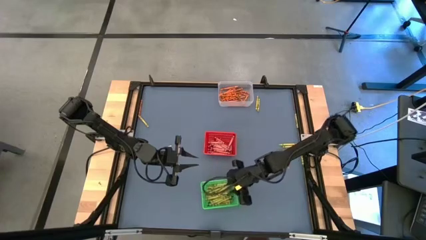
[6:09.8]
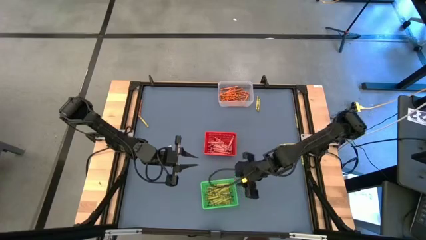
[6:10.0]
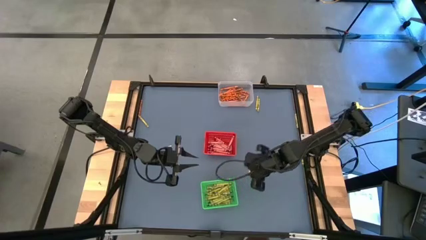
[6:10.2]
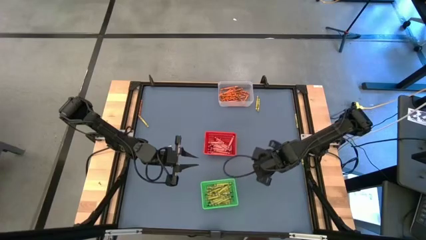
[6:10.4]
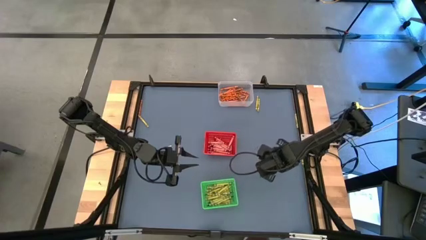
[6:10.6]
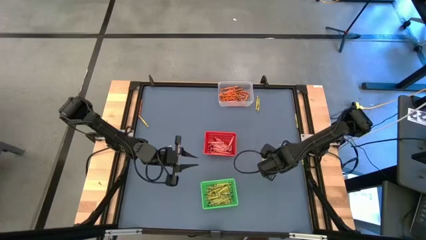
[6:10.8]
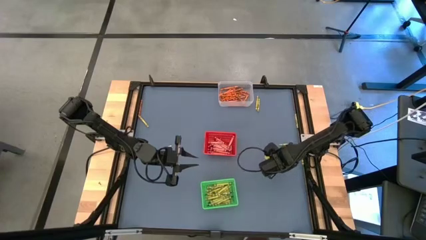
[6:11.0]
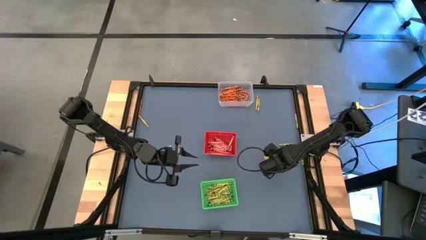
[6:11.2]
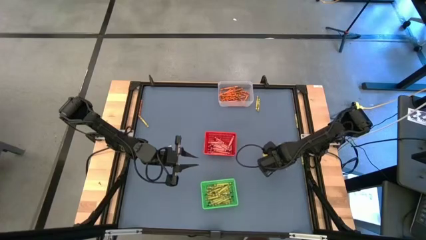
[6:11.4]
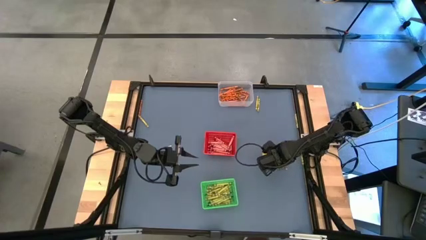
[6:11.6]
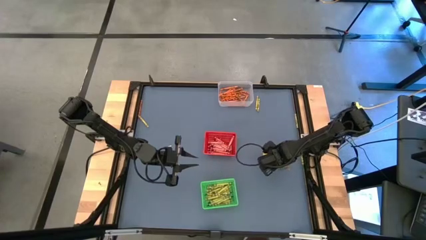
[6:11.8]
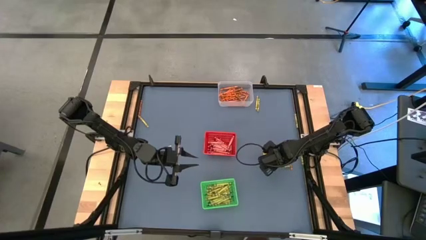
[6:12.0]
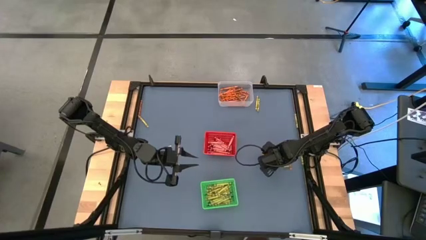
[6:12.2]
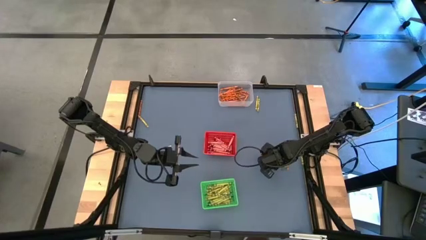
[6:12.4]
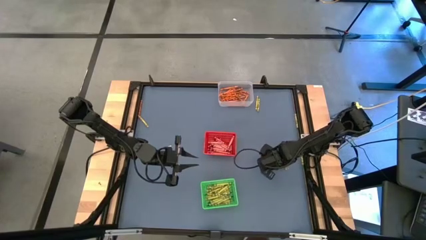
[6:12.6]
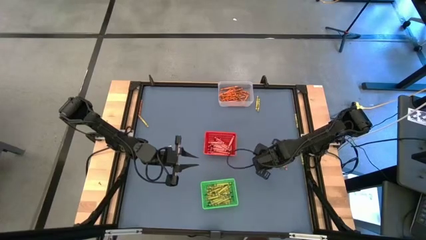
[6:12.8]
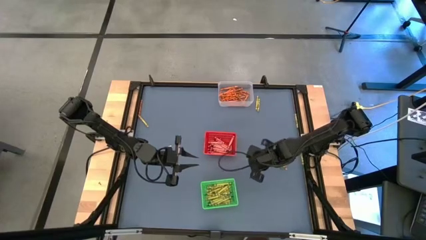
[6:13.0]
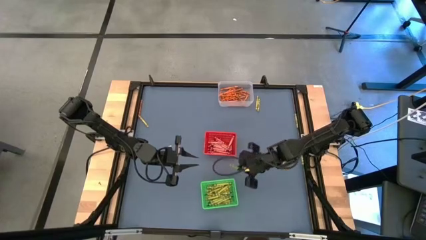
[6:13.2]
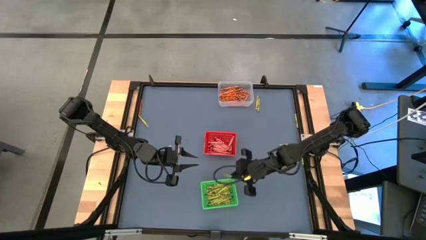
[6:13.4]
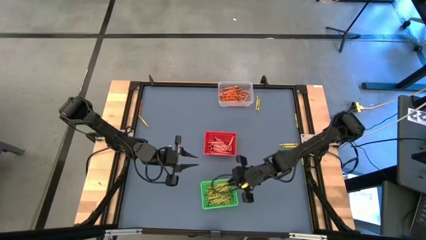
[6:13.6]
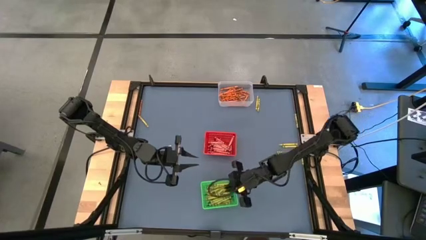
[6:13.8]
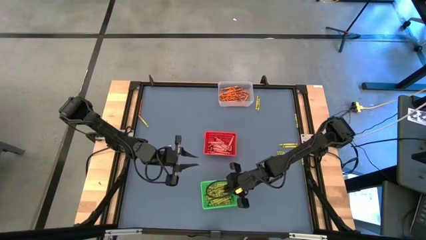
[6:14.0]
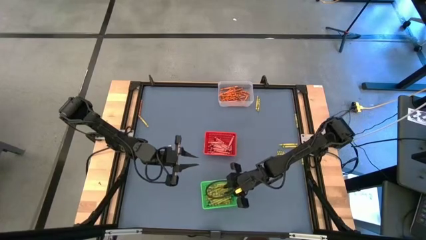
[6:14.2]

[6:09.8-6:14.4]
Task: Sort crayons
Put the green crayon into the green bin

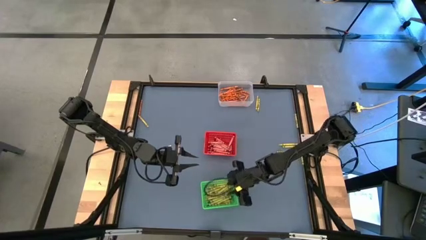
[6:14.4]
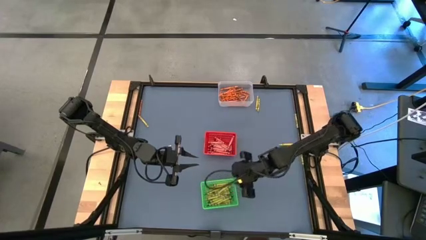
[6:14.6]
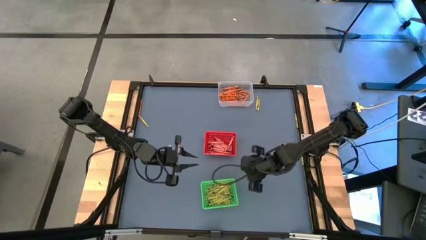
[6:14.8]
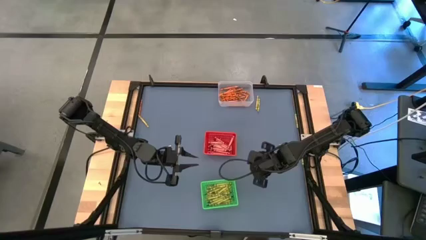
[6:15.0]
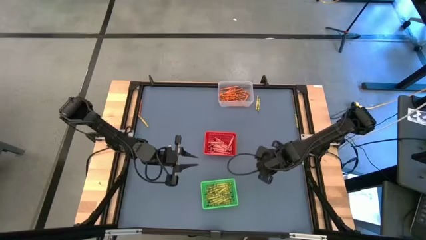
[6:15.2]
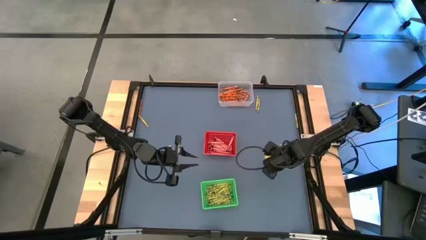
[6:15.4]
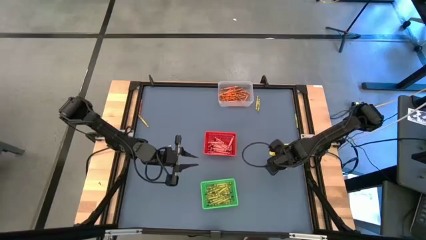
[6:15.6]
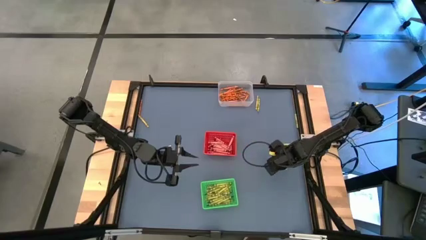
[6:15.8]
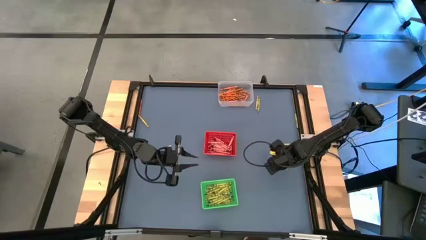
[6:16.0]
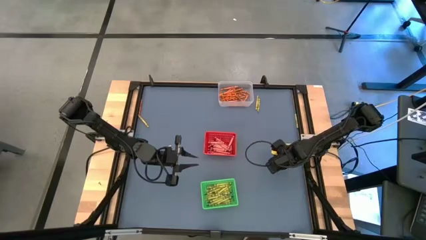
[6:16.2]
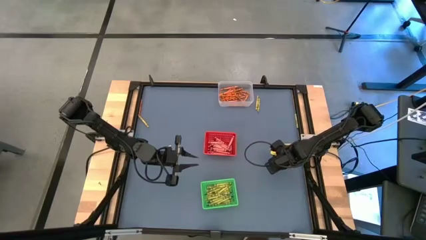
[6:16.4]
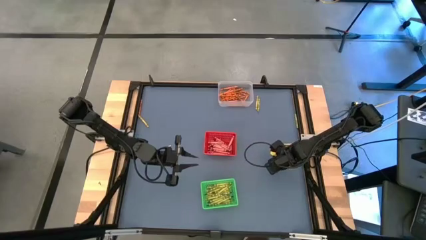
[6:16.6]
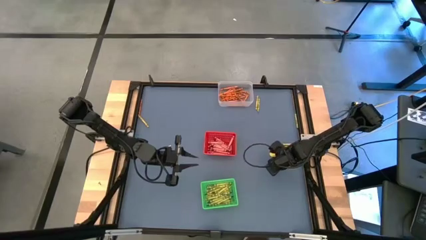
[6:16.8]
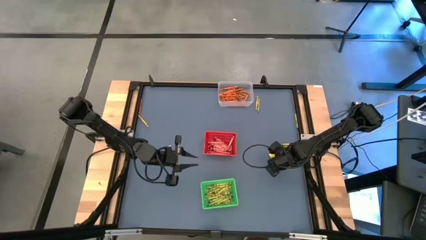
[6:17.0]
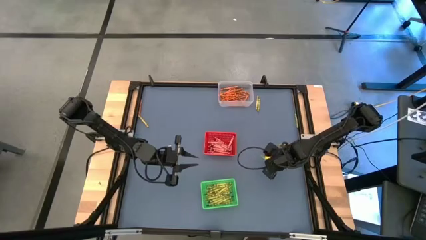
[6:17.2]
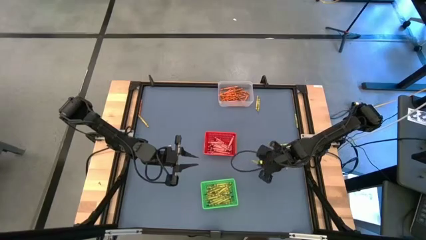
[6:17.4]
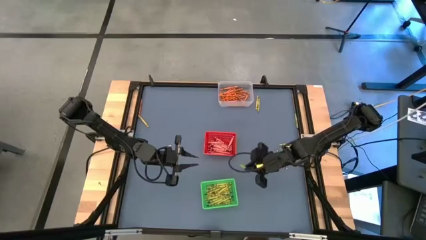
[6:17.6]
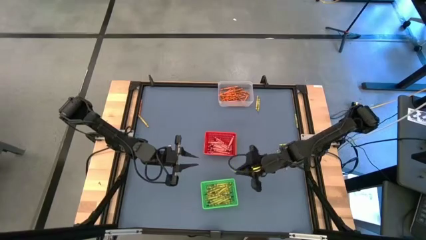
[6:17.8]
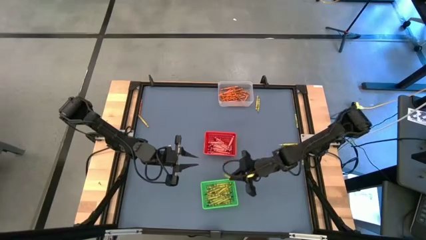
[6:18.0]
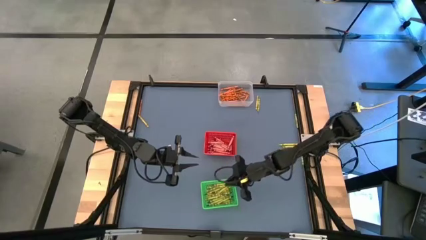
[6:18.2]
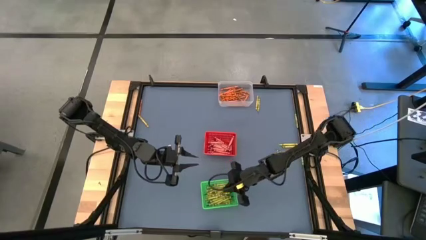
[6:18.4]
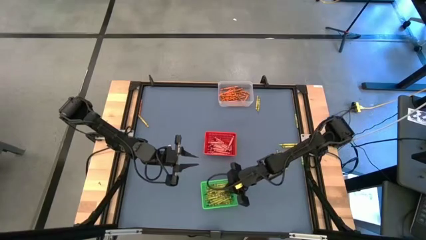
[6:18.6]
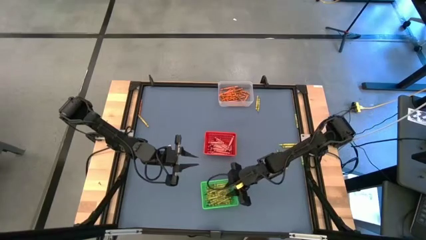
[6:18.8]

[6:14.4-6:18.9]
Put the green crayon into the green bin

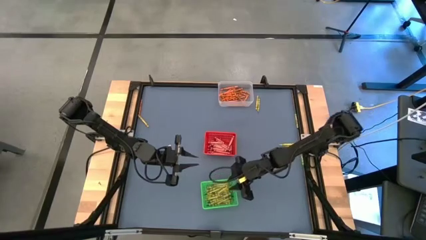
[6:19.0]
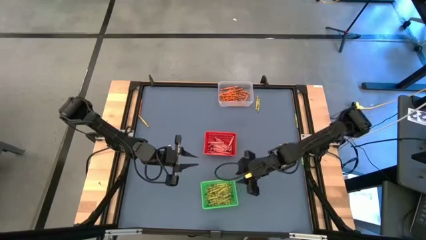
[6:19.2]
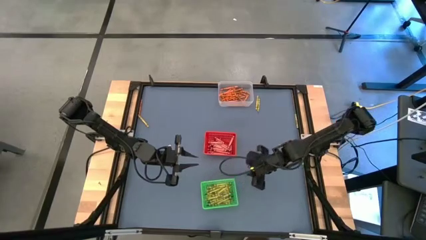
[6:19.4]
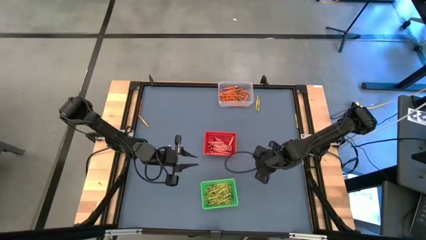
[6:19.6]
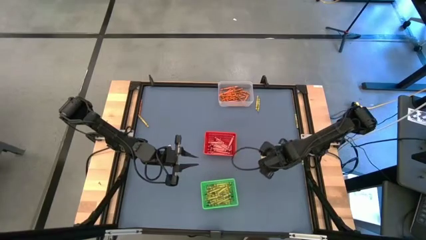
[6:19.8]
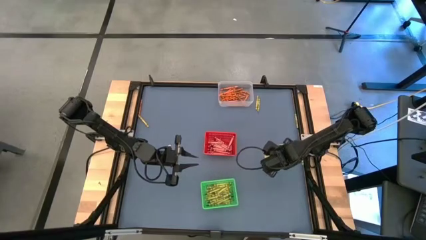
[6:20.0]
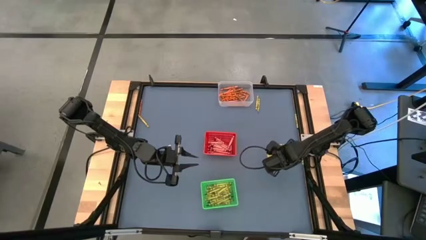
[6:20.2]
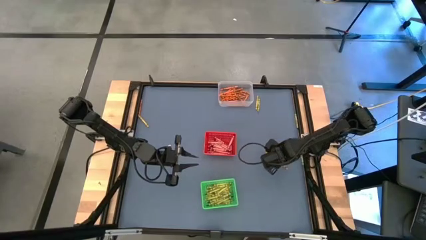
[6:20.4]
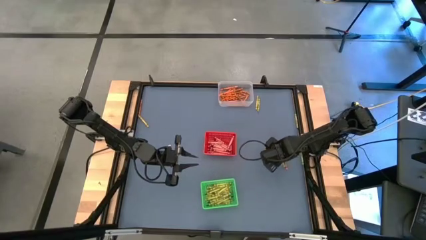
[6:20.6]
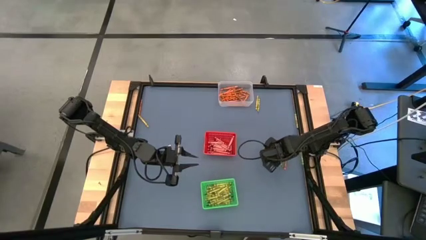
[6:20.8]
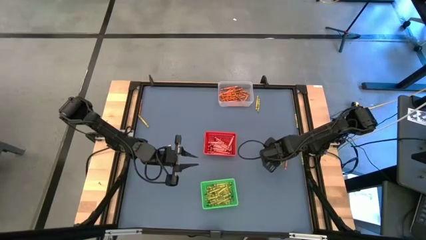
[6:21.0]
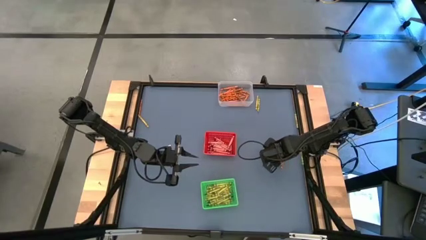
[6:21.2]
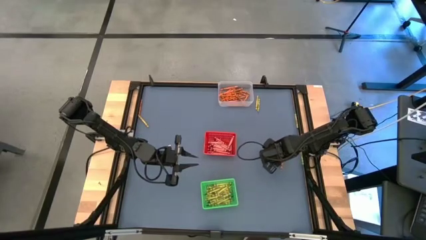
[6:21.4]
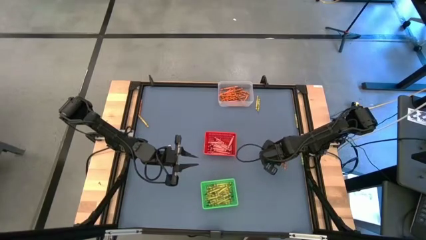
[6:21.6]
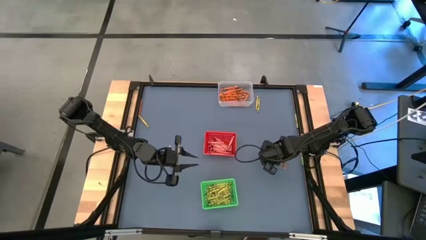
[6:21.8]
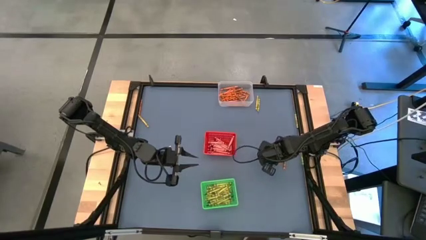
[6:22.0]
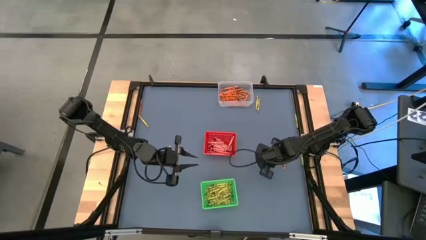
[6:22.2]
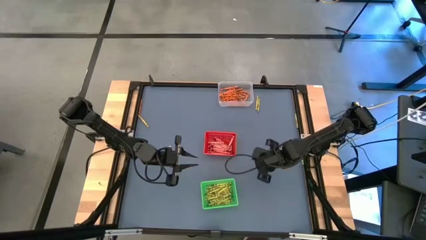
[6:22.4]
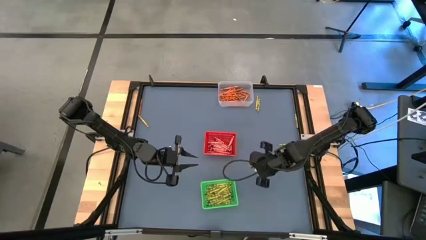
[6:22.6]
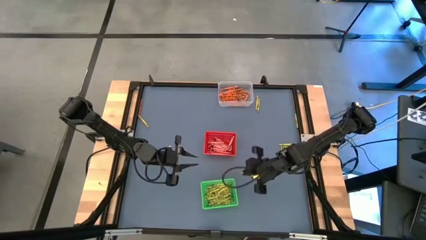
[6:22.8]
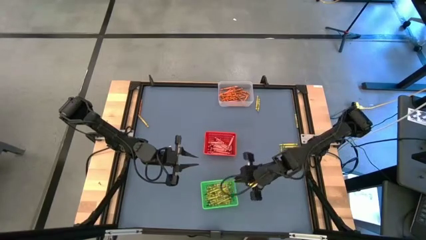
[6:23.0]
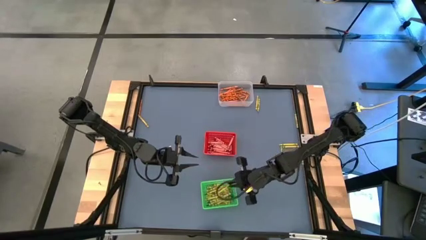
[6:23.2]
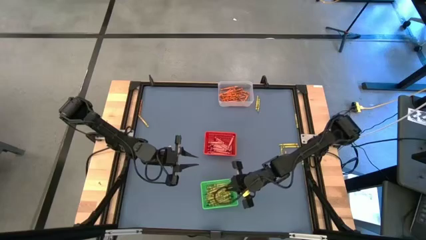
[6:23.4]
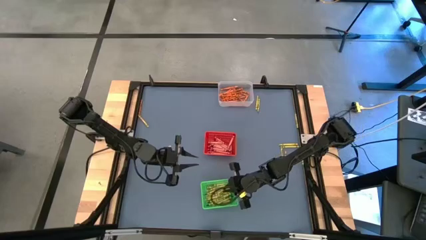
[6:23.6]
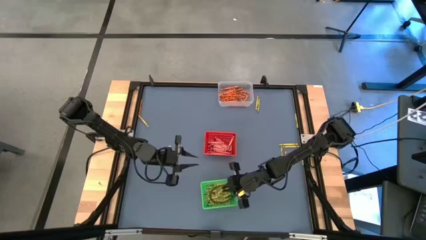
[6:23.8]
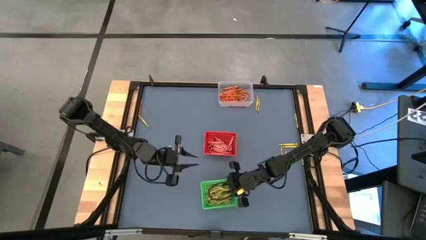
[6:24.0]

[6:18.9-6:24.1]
Put the green crayon into the green bin

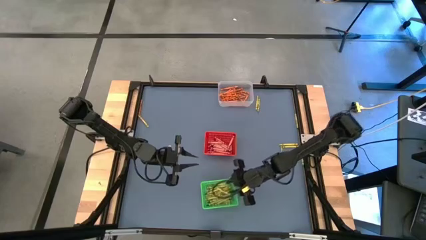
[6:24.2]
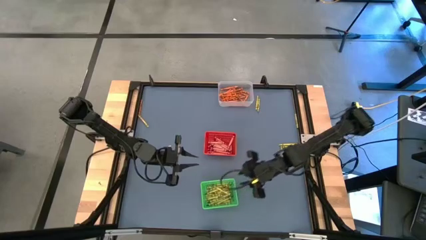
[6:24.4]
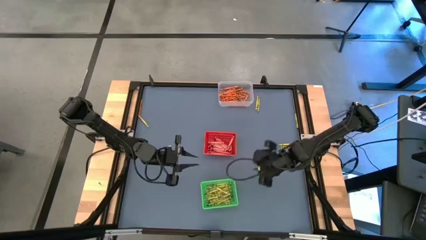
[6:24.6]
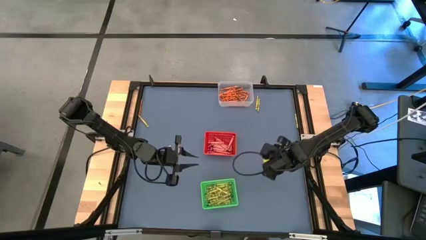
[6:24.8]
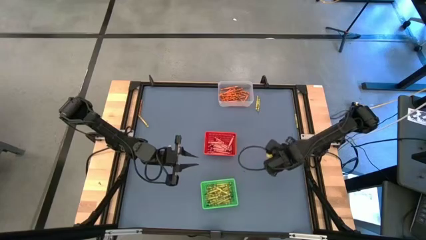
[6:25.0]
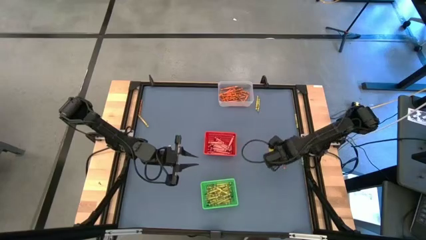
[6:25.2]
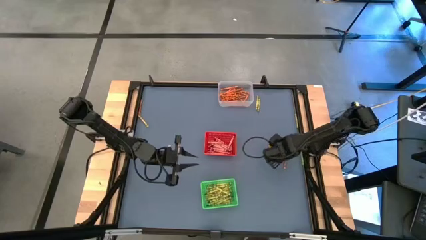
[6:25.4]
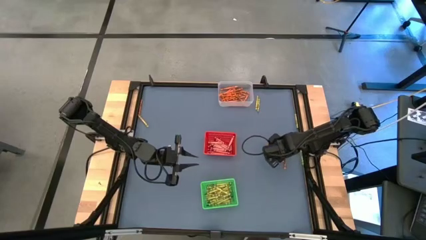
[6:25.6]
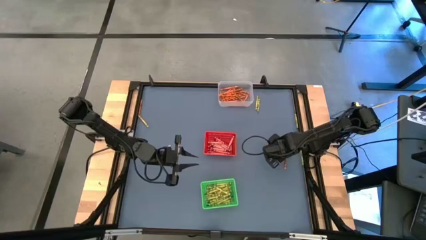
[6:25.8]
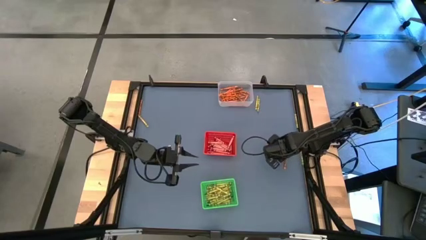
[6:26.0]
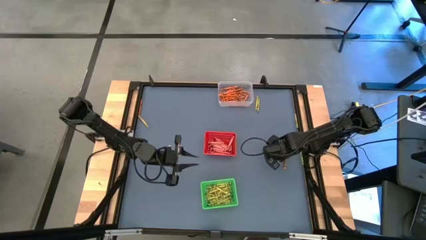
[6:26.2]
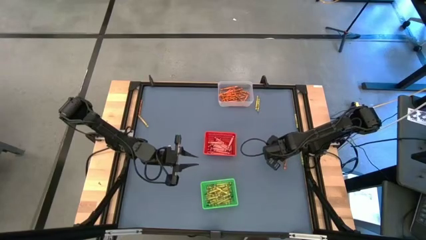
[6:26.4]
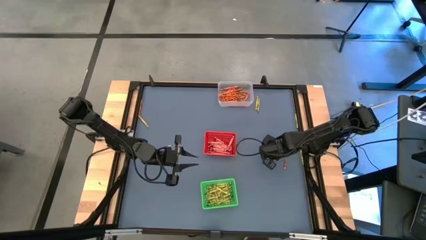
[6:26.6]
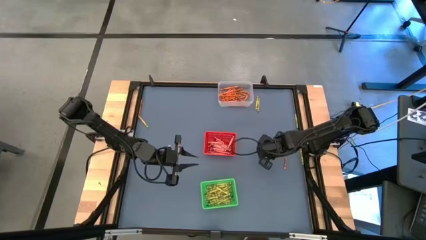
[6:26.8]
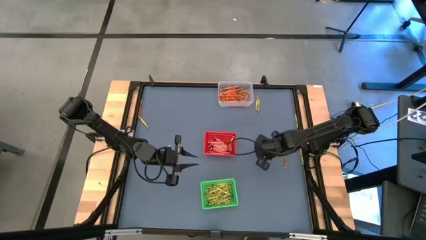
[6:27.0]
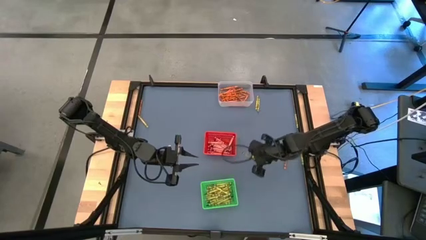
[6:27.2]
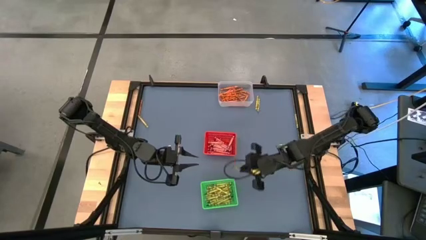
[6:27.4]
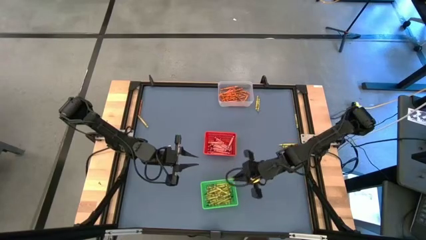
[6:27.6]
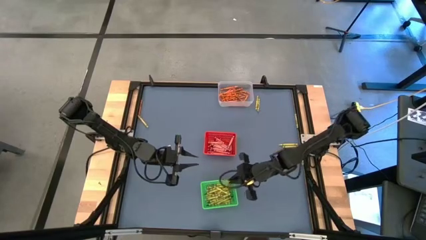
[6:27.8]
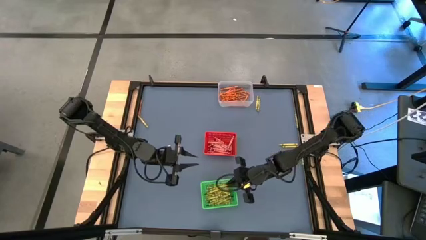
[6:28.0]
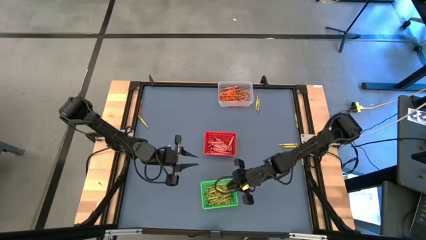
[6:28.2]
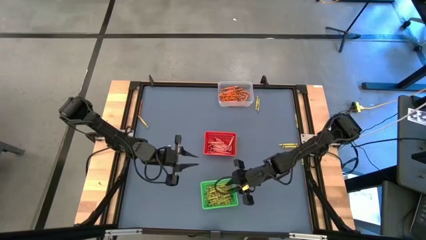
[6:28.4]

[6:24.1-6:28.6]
Put the green crayon into the green bin
